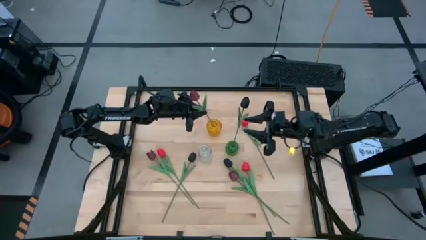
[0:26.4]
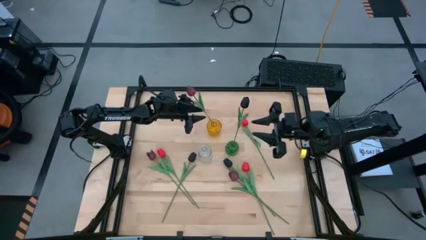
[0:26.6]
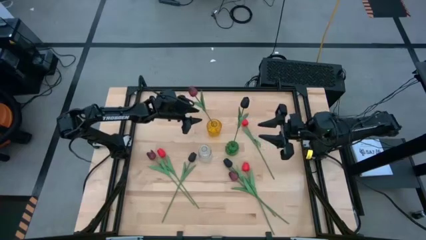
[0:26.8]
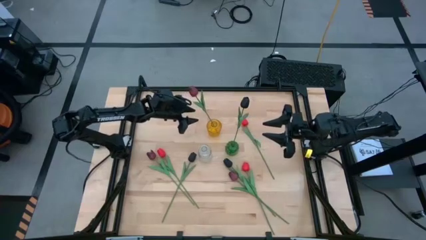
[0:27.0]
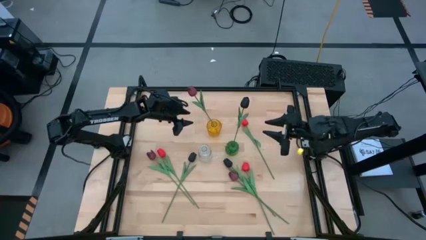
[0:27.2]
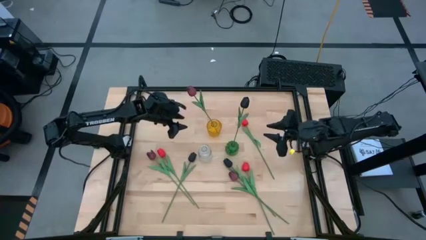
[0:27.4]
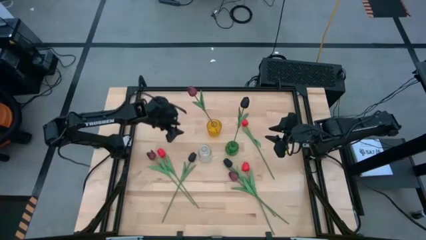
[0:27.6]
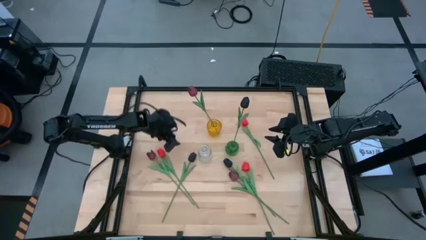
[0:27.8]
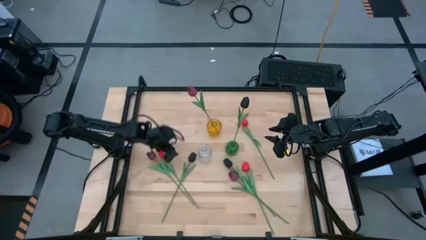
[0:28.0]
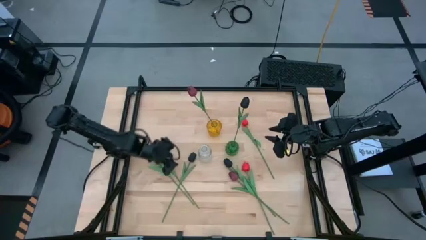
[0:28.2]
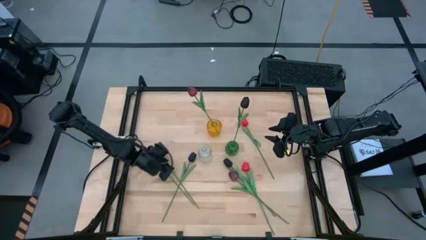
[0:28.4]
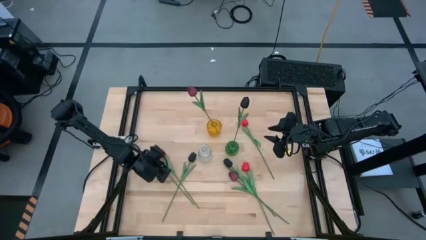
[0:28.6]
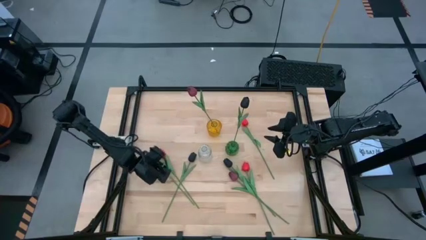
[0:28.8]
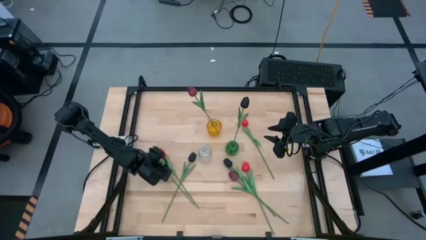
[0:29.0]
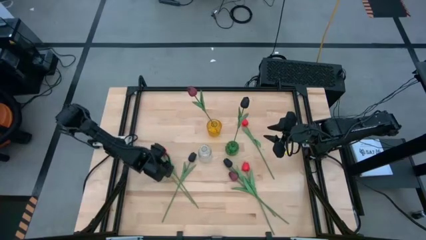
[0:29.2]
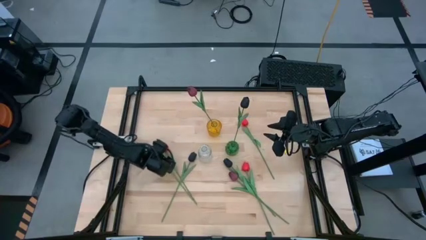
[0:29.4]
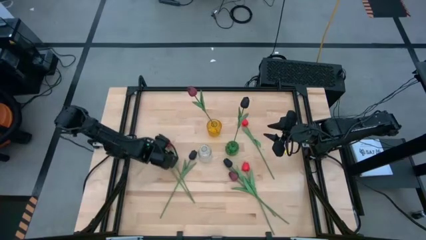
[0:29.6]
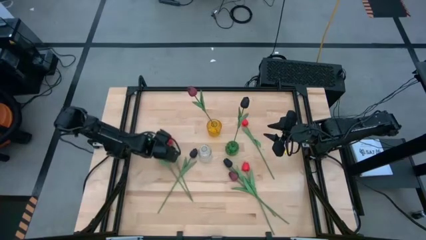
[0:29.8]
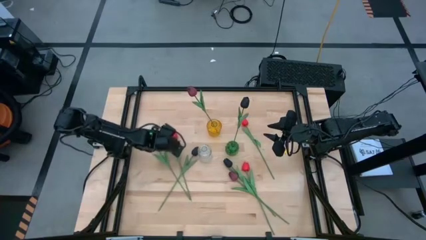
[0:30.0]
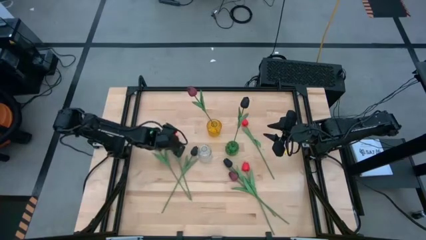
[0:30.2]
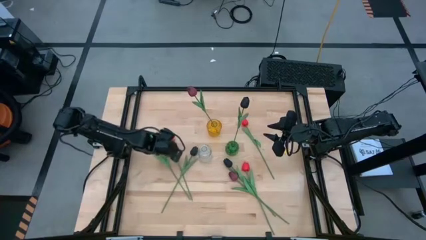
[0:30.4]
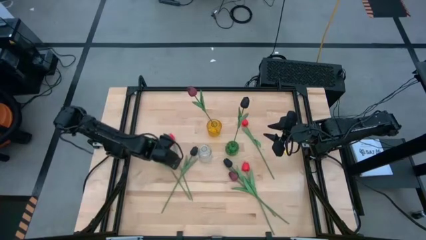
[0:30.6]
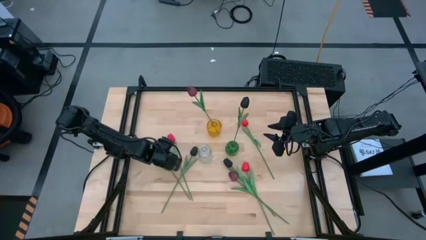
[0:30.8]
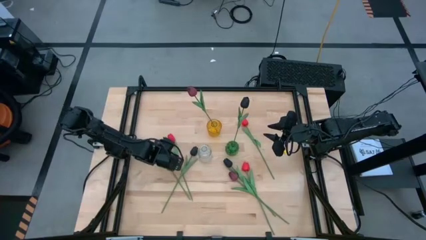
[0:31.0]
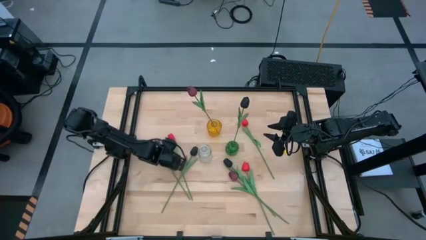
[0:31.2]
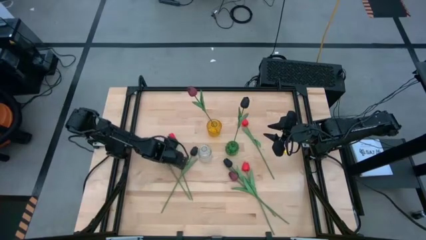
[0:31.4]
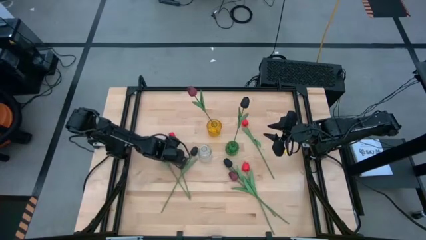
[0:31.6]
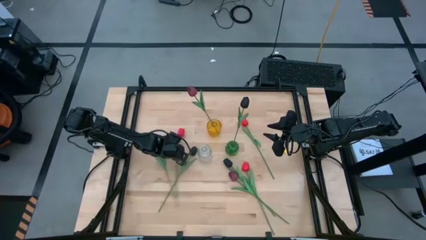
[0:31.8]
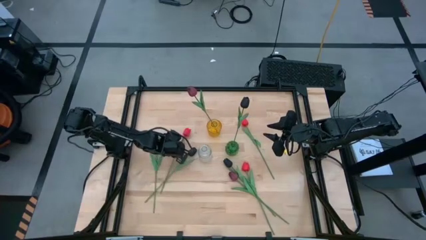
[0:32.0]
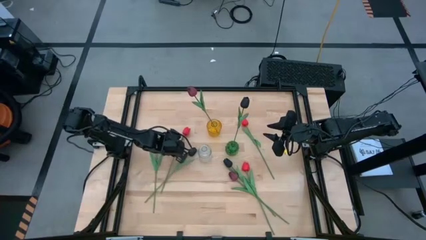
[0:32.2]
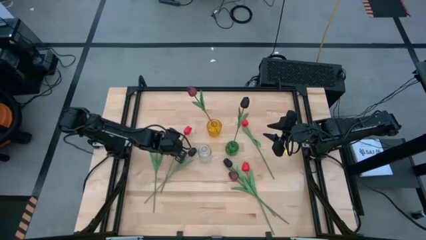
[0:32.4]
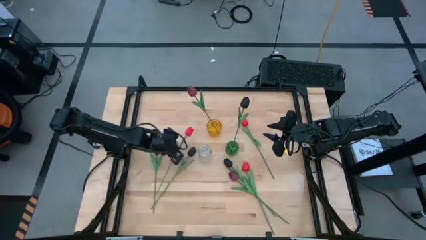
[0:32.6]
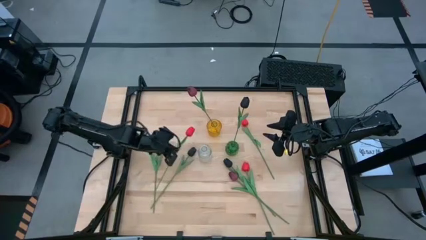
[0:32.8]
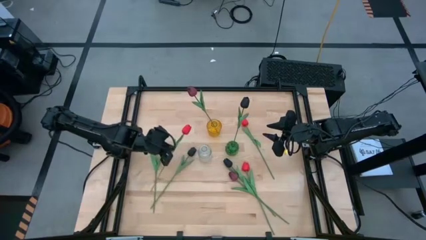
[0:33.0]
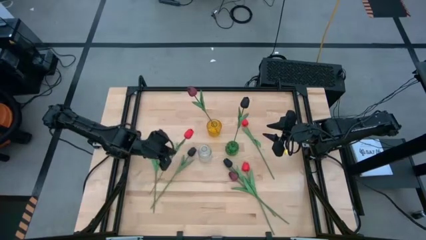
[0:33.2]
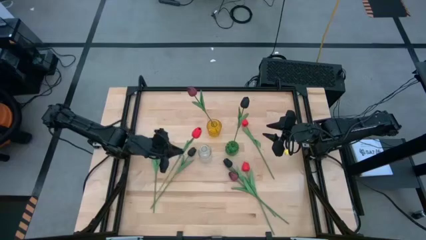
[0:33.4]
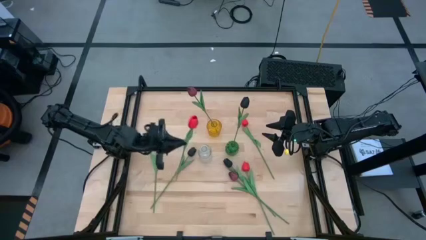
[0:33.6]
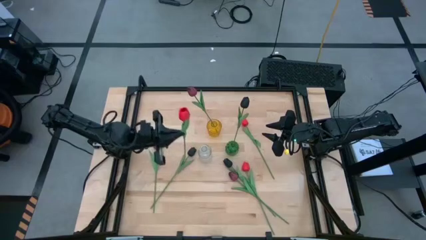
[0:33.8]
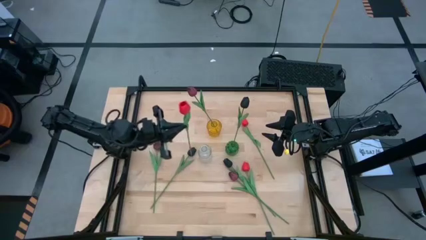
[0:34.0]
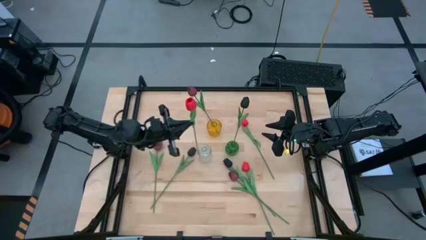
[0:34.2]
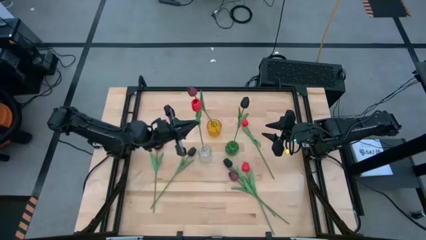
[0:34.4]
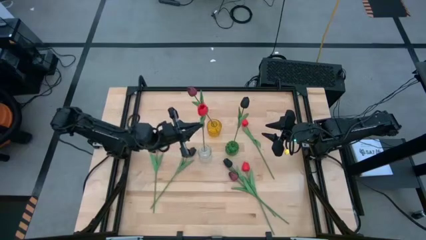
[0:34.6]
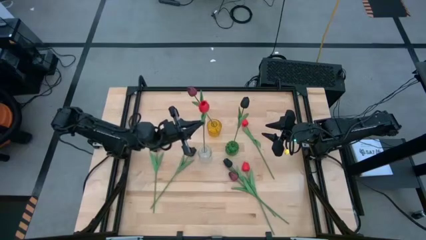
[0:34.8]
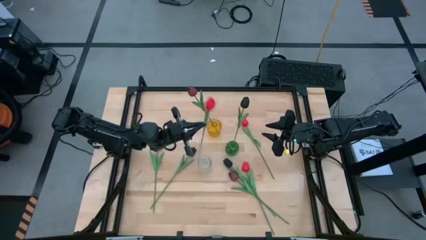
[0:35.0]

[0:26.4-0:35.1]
Task: Sort flowers into vase by color
Put the bottom left orange flower in the transparent flower vase

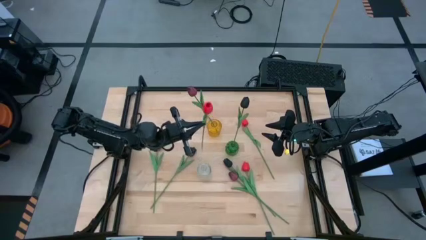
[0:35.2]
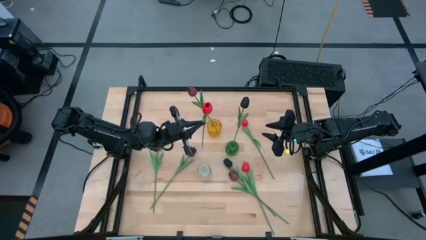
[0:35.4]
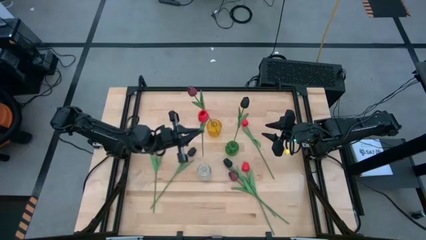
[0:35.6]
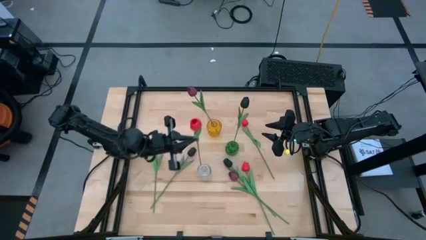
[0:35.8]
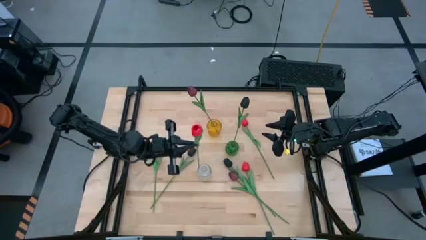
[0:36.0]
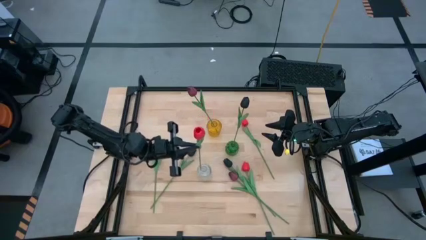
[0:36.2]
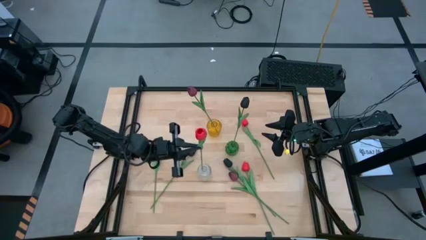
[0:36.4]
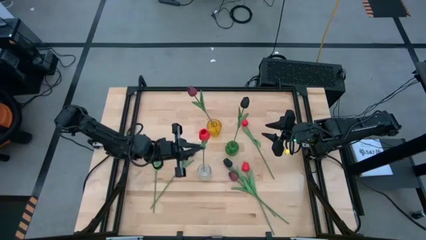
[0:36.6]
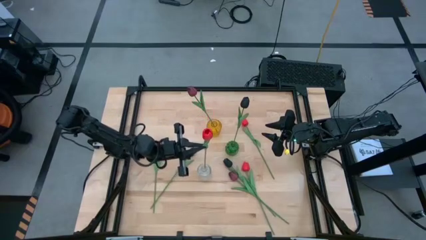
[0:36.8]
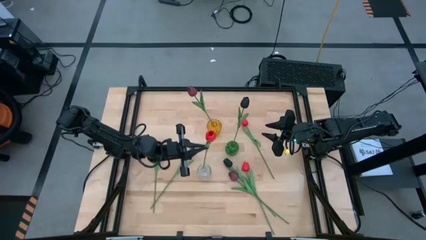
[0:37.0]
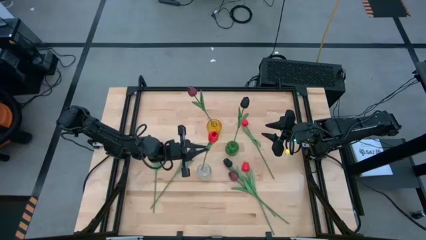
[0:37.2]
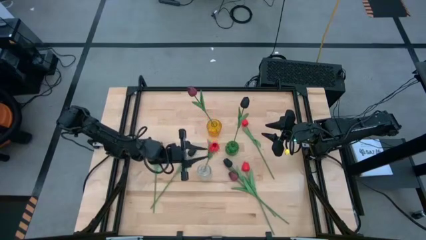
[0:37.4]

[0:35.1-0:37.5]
Put the bottom left orange flower in the transparent flower vase

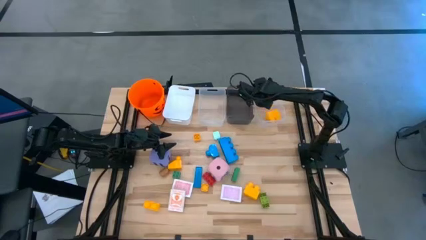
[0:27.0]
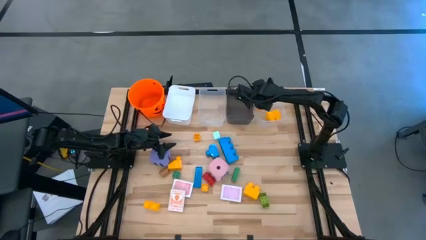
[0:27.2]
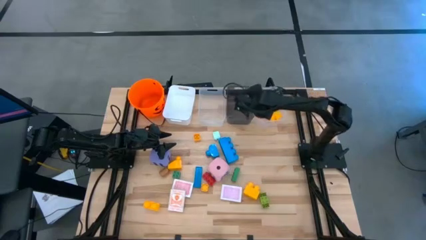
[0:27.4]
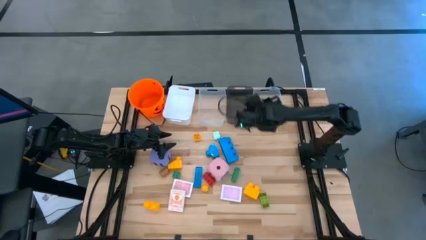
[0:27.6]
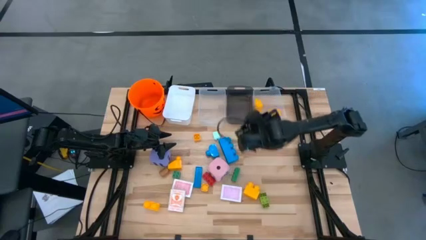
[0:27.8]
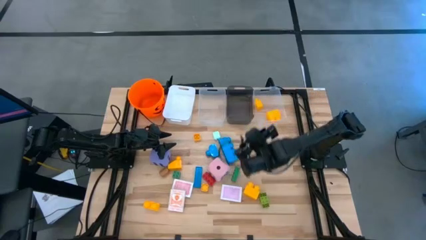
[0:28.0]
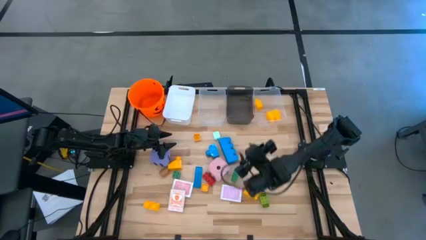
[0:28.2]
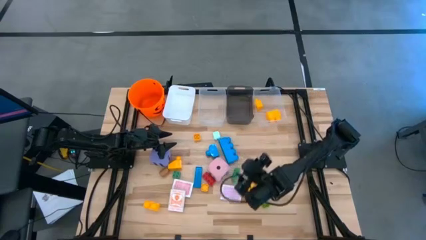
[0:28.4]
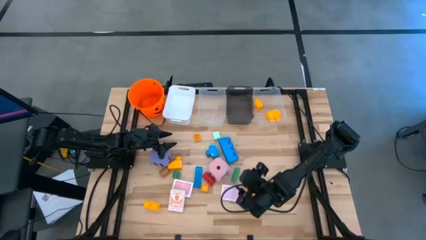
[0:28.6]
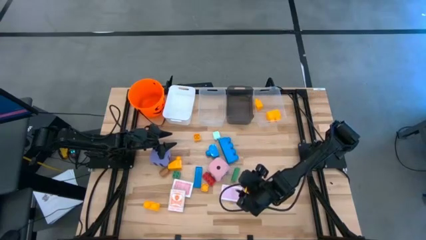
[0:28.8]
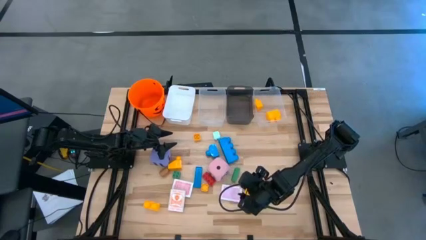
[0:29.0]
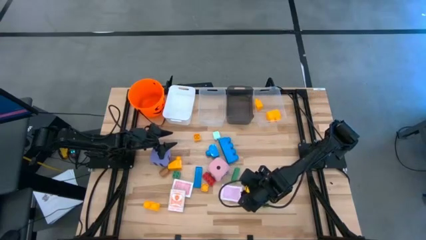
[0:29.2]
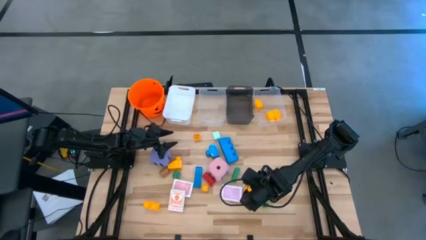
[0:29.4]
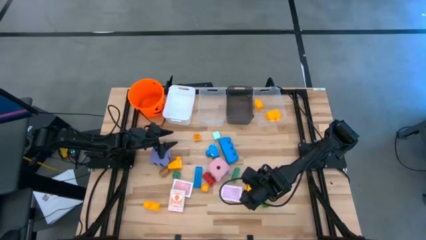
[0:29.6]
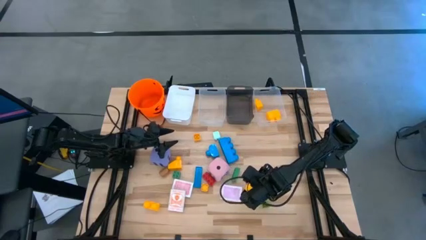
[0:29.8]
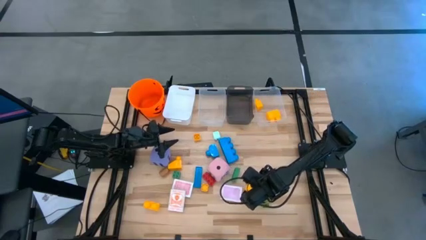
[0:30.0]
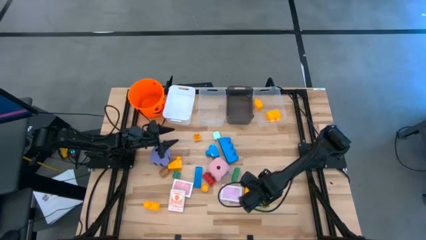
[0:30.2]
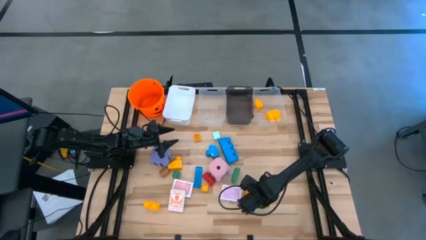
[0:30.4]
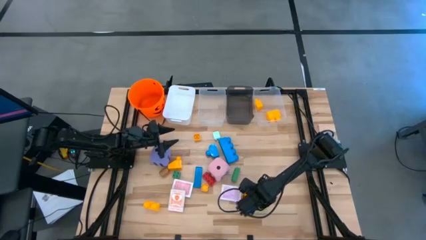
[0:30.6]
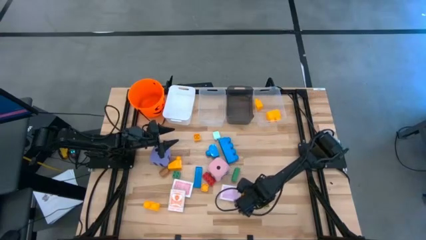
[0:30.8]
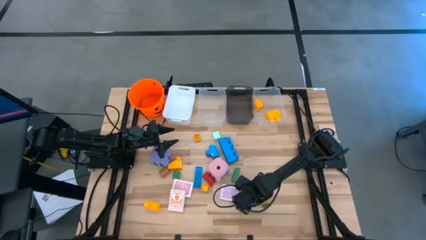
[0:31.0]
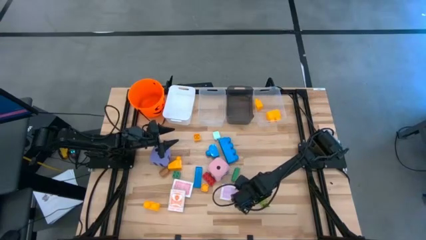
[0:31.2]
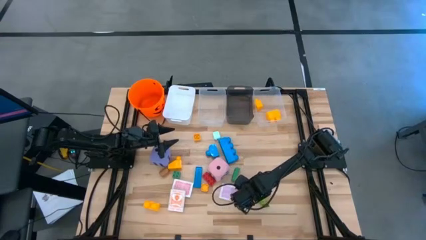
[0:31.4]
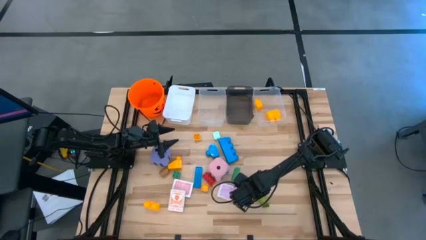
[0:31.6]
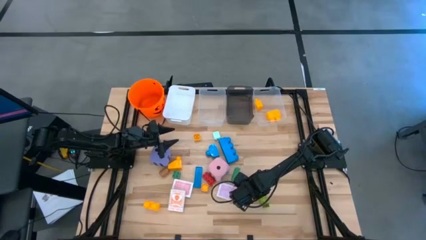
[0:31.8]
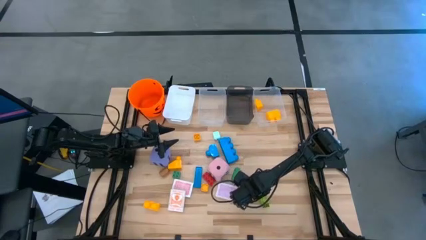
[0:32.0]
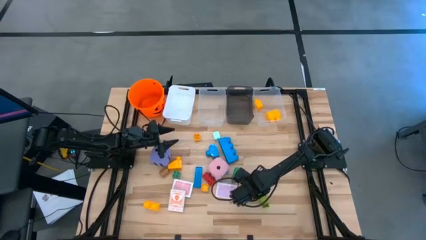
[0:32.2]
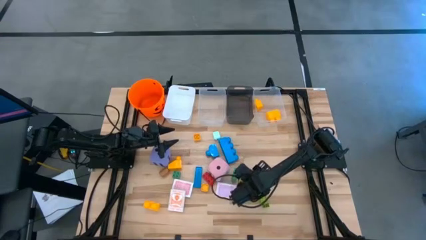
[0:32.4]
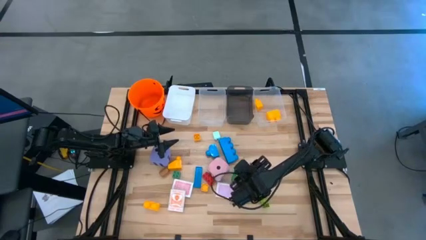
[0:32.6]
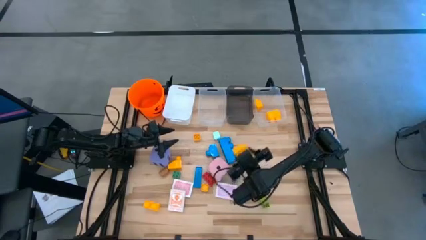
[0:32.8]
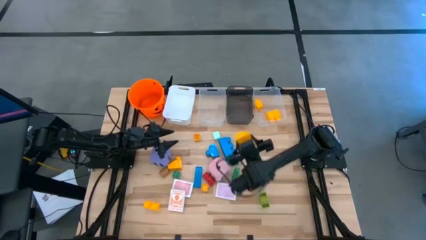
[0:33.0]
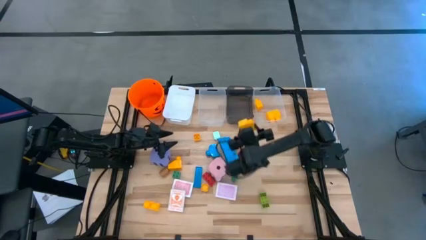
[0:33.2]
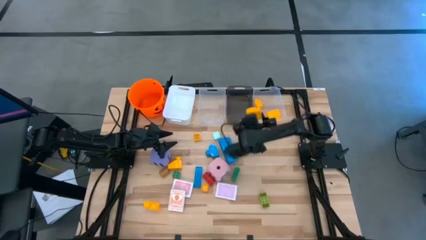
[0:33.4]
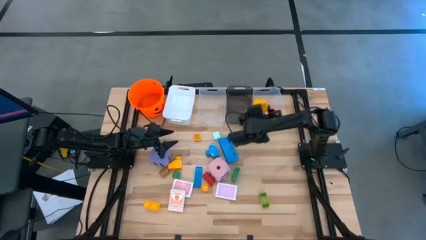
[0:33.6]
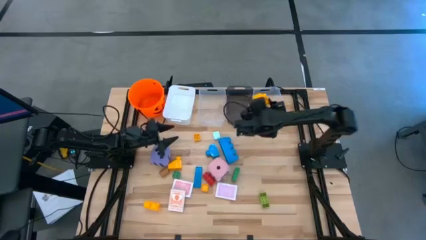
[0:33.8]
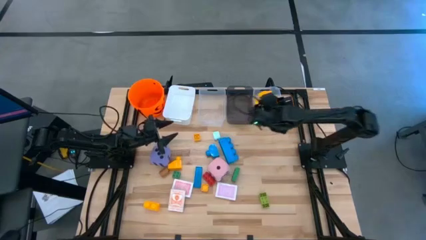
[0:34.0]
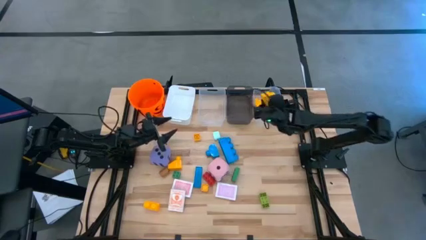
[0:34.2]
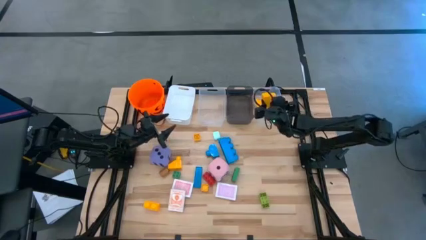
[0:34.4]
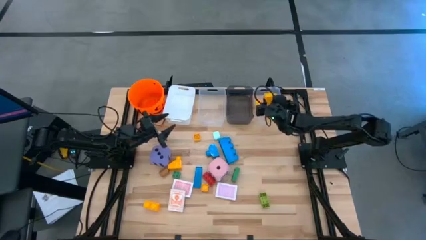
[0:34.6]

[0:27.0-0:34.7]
Task: Pick & Place Toys
Put the big yellow game piece into the right transparent bin
